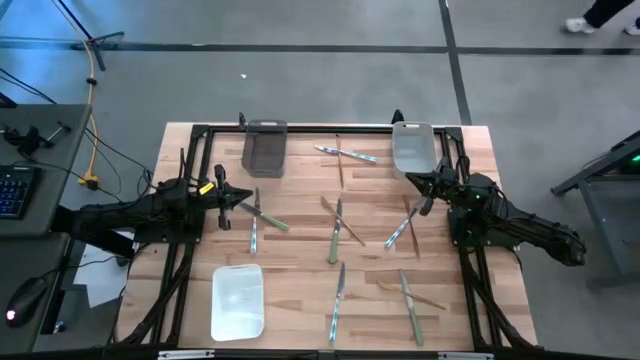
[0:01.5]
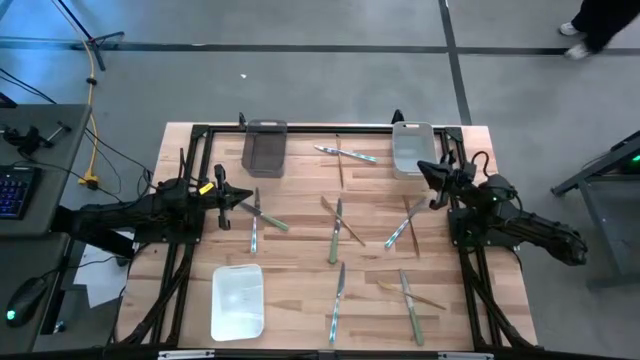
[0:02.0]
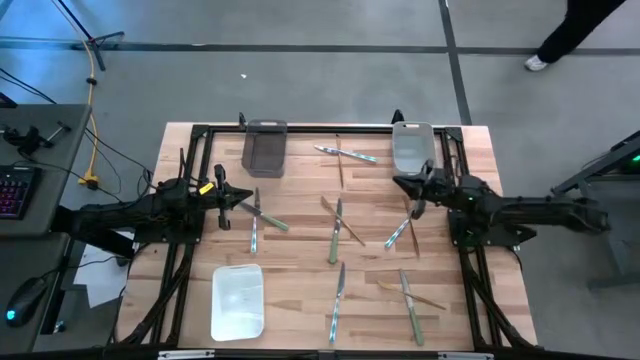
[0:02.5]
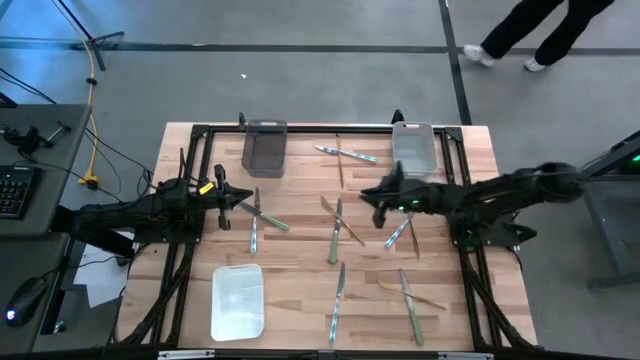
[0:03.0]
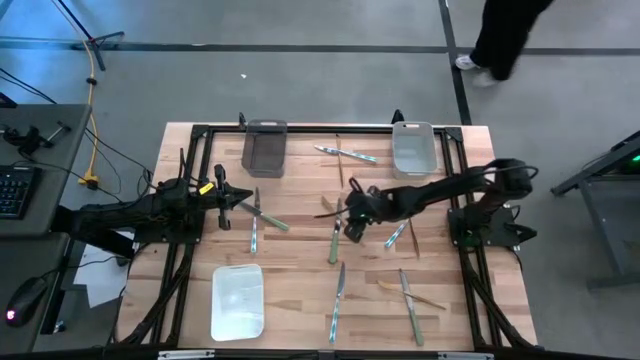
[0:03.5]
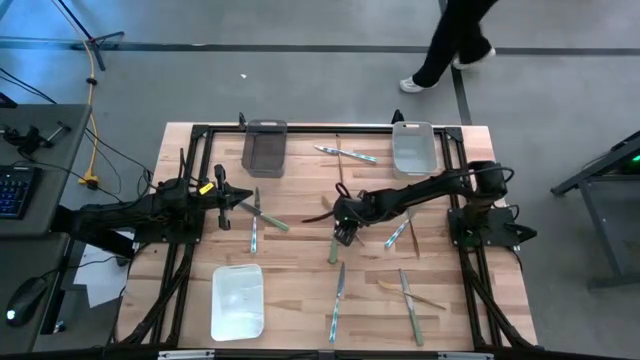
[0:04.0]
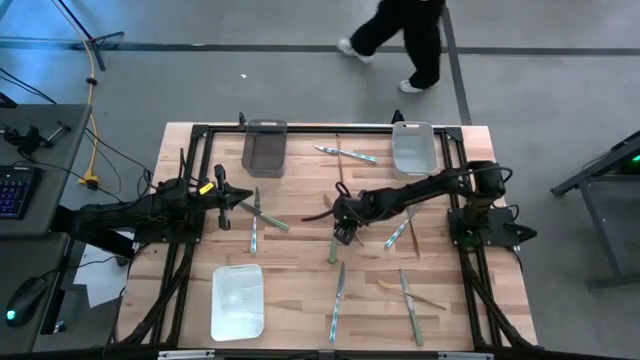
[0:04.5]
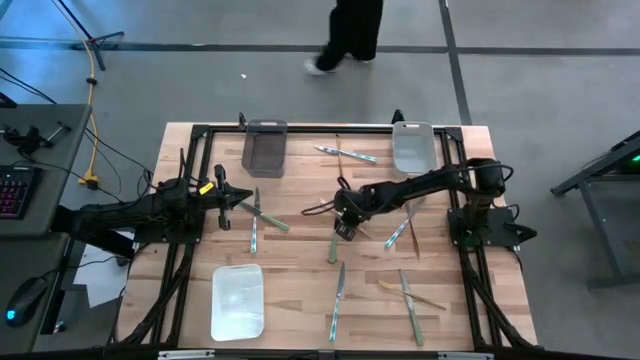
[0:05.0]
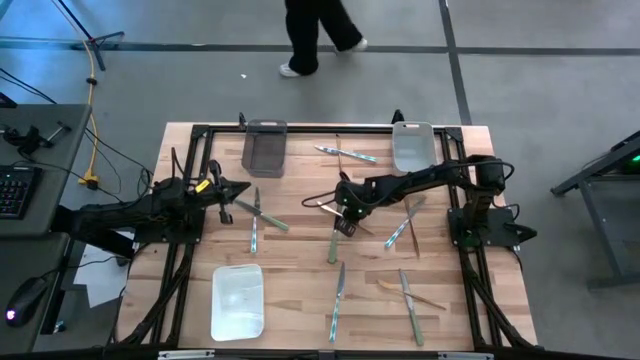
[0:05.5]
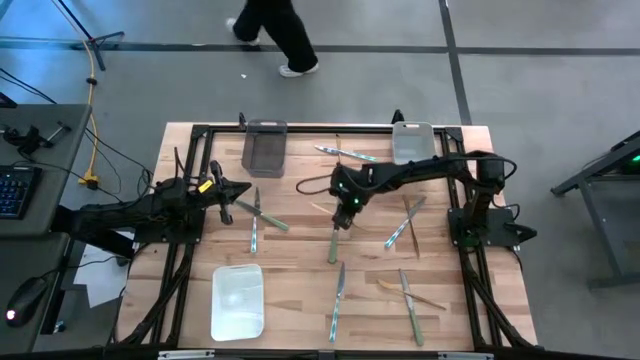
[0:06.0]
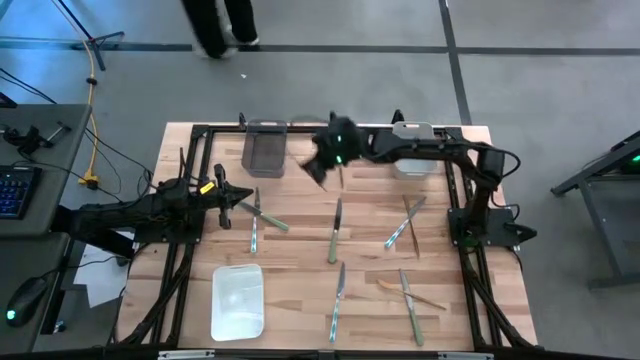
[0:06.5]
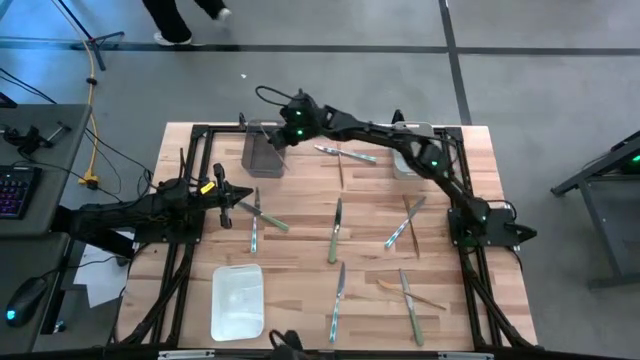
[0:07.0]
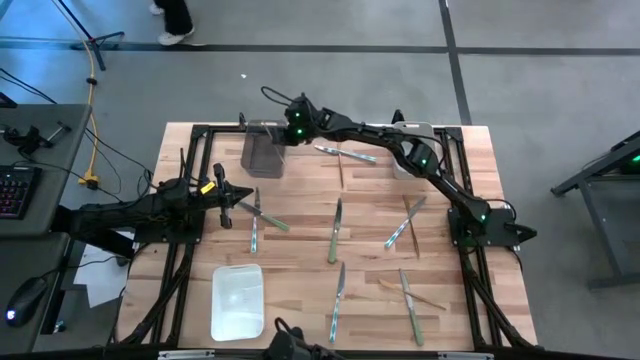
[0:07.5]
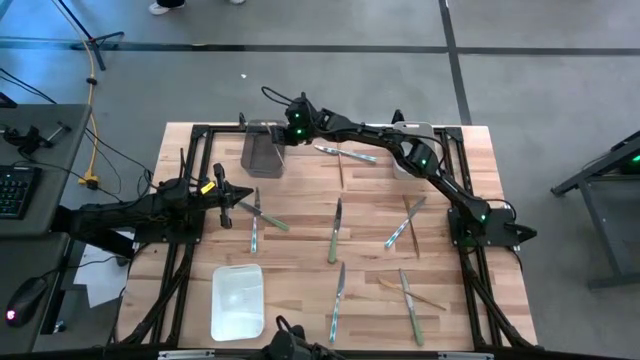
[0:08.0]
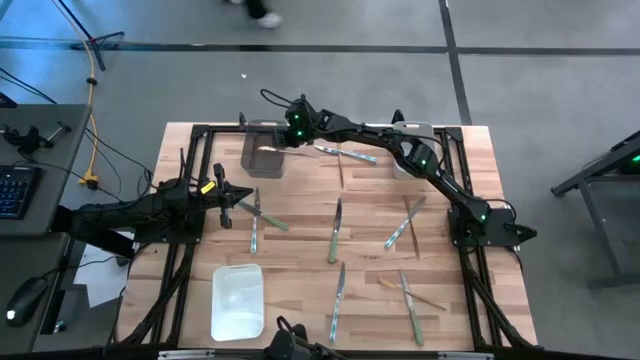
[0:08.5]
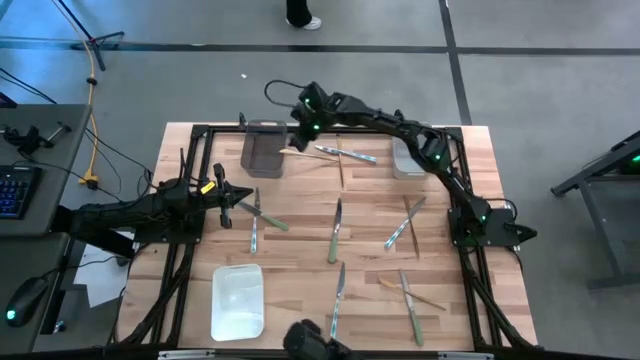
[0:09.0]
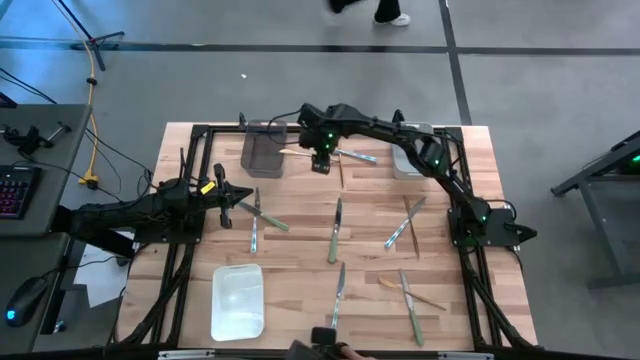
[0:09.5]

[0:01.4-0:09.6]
Task: Sort silverware by color (type)
Put the gold table knife into black bin

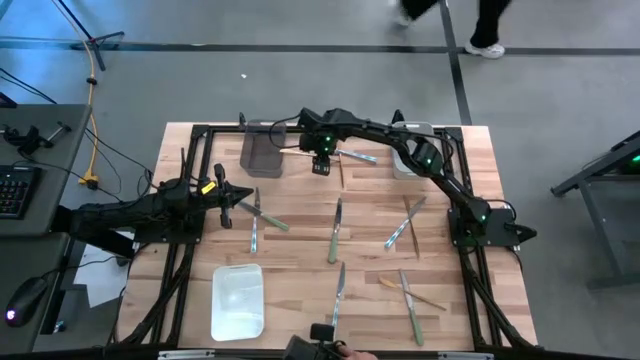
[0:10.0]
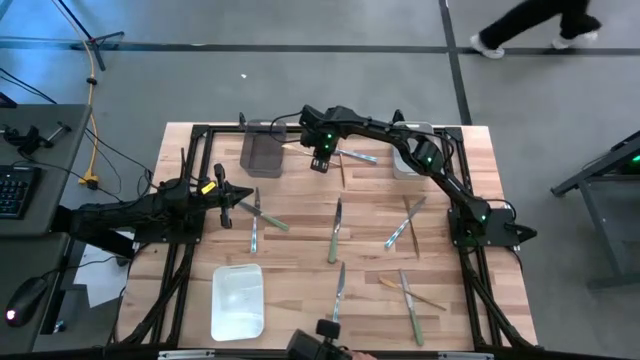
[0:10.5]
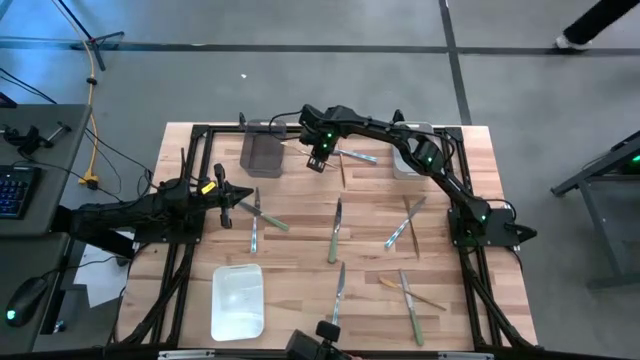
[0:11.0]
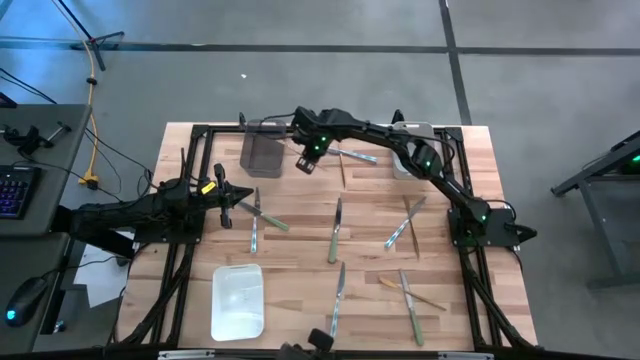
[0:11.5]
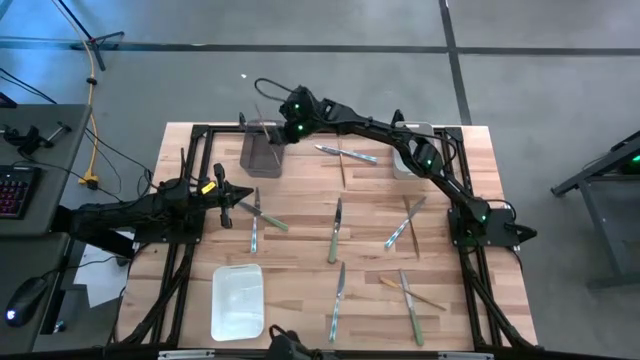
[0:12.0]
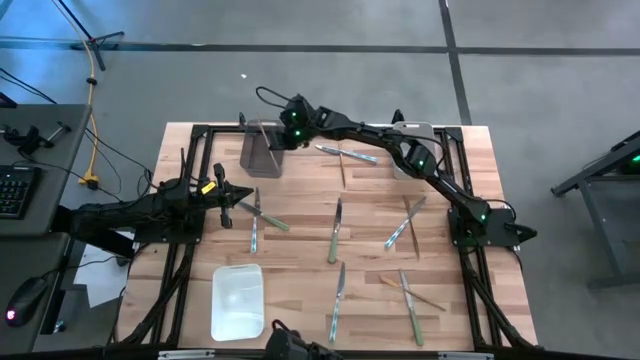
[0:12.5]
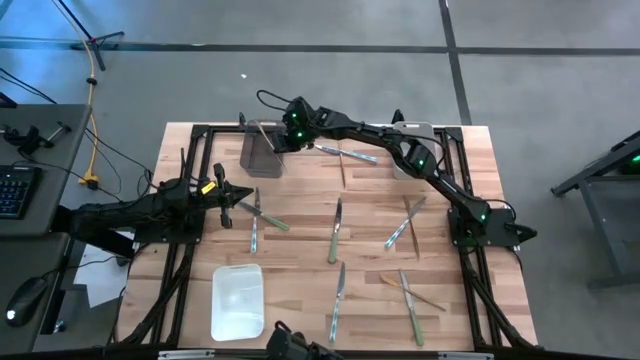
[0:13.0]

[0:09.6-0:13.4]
Put the middle left orange table knife into black bin

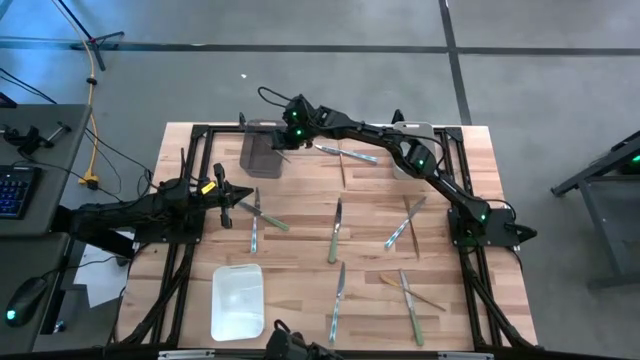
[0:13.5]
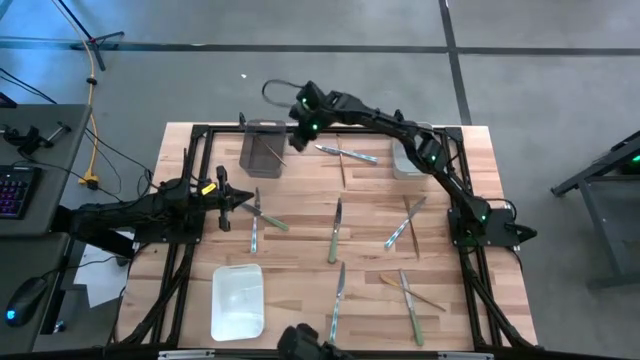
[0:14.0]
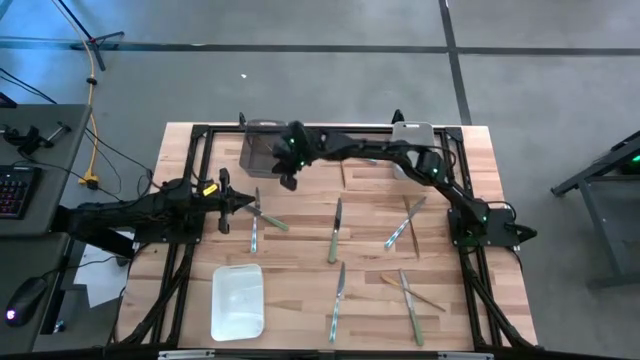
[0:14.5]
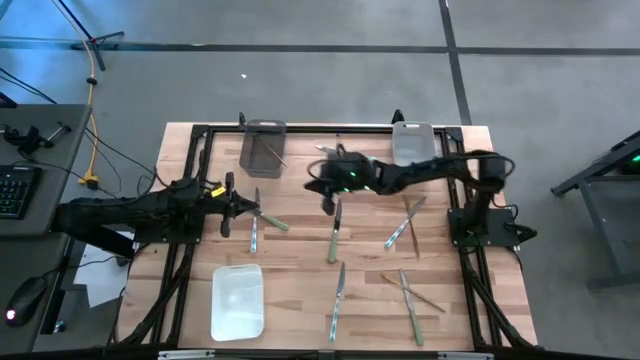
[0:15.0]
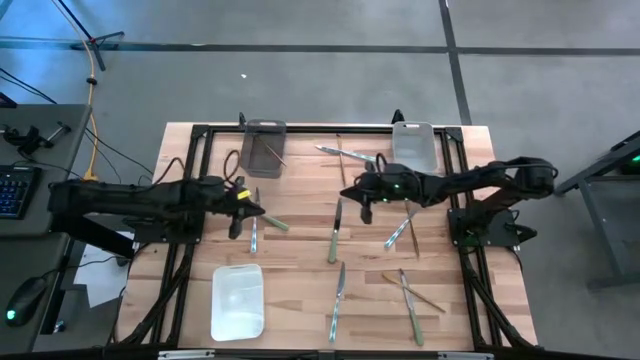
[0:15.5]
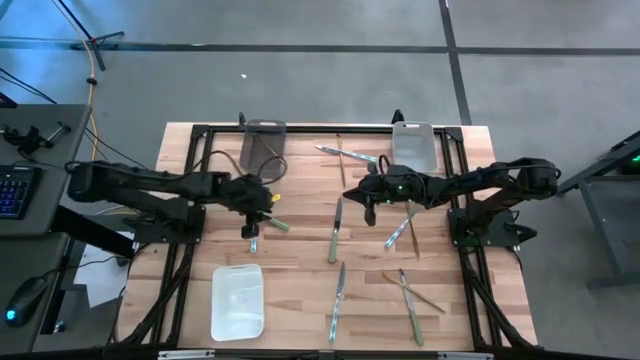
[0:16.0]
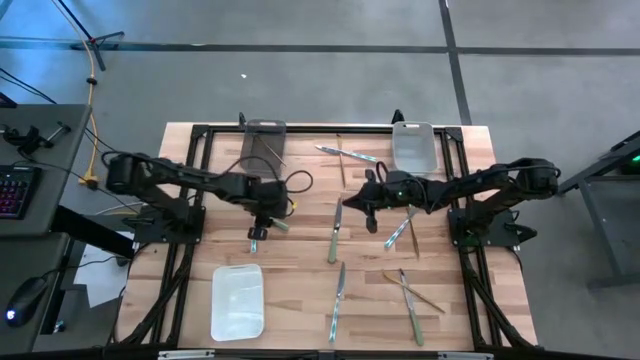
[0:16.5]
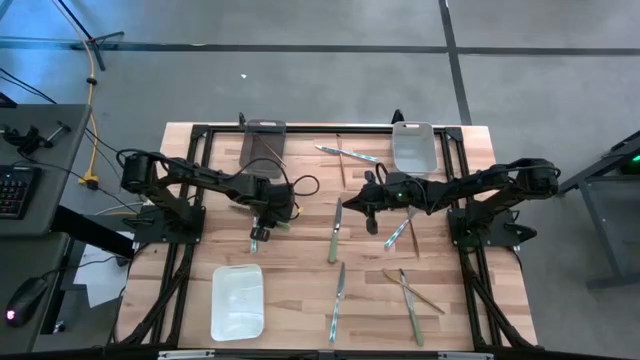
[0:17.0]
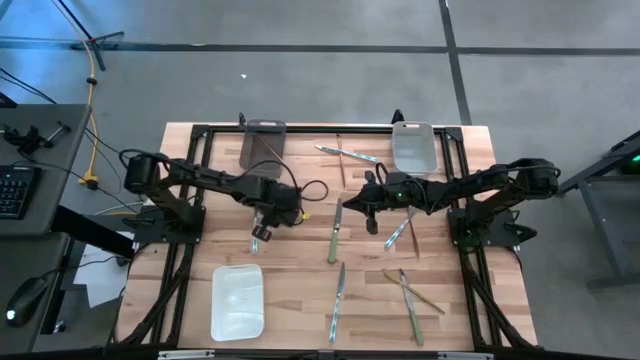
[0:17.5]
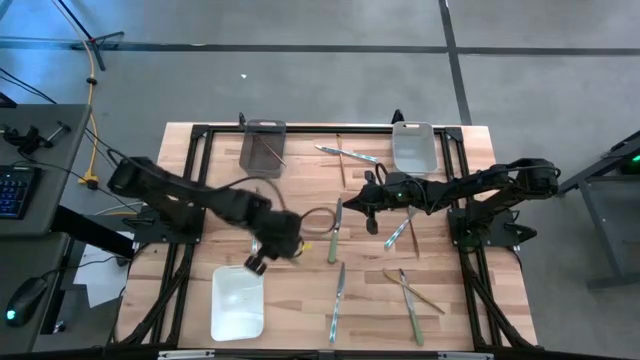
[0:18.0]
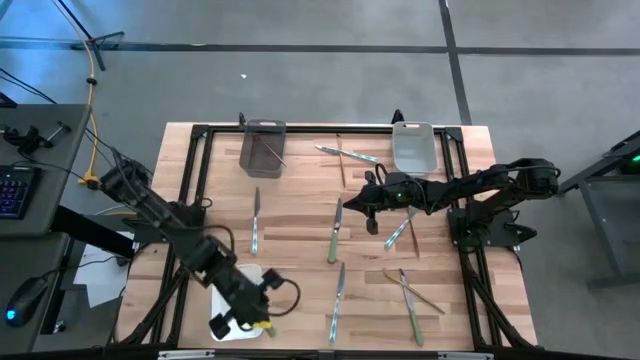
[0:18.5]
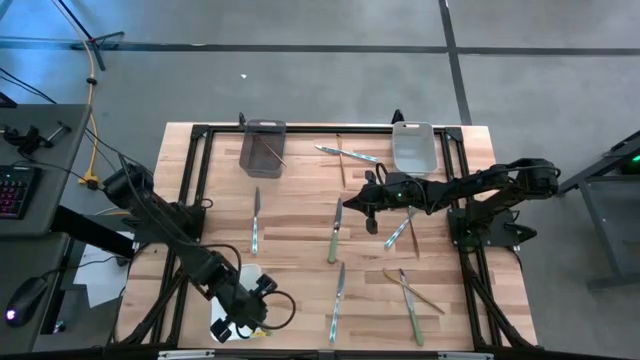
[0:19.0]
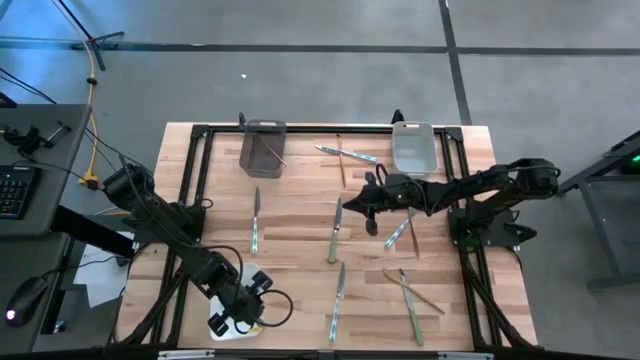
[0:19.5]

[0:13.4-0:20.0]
Put the top left green table knife into the white bin

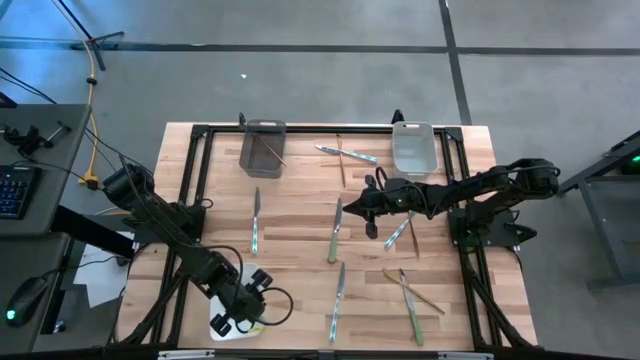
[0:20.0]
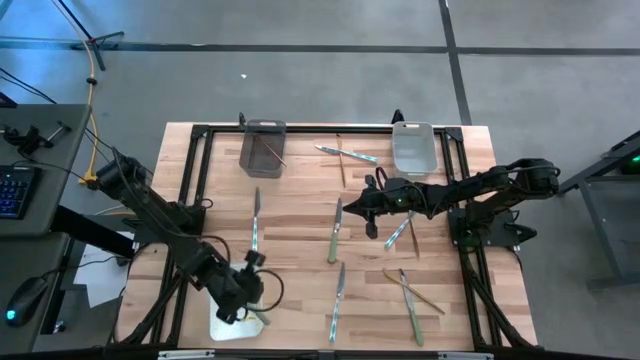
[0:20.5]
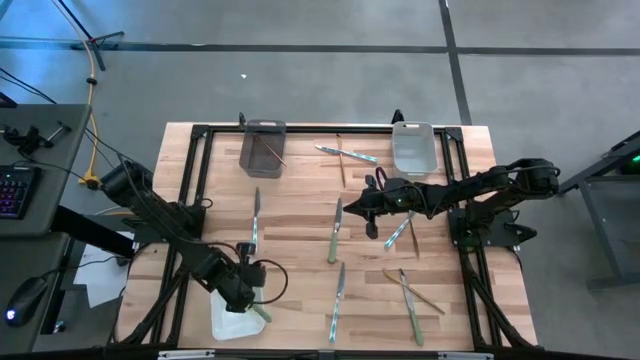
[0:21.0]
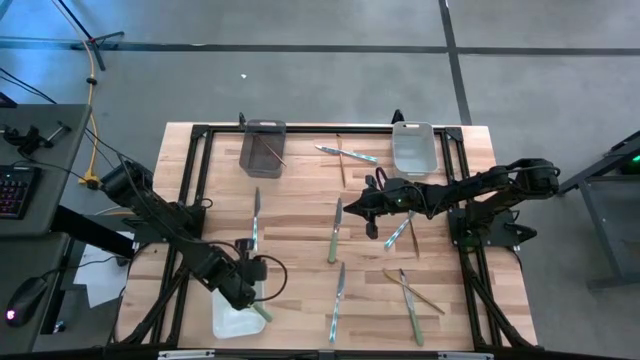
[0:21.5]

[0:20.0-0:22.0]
Adjust the white bin

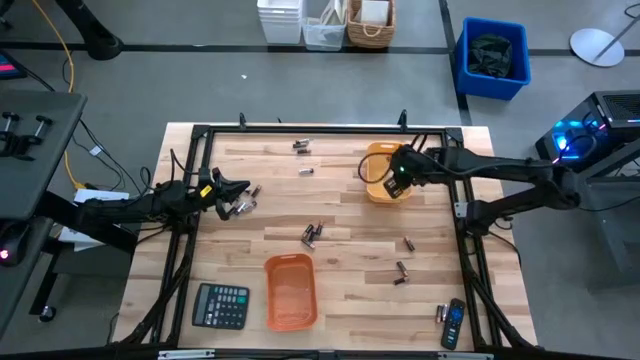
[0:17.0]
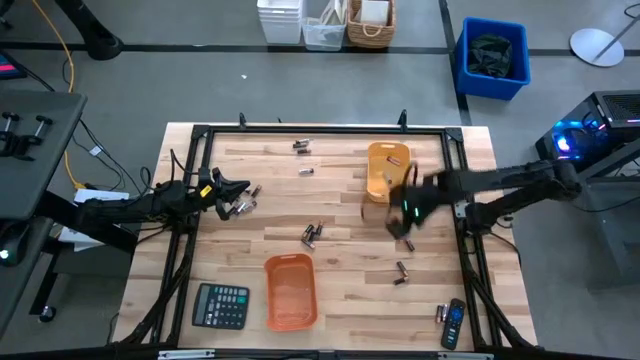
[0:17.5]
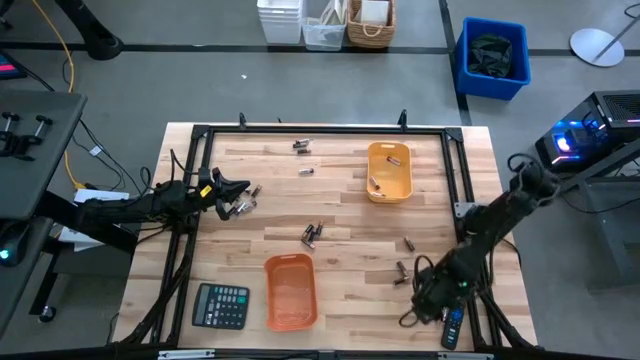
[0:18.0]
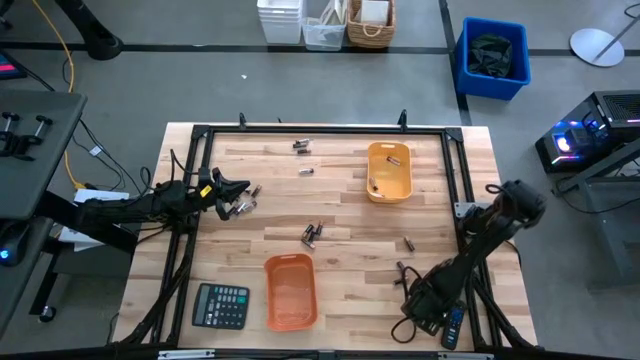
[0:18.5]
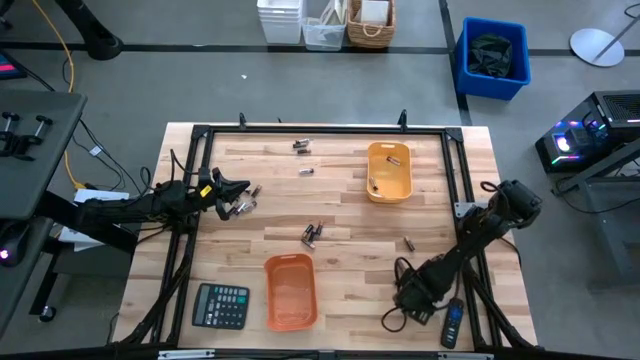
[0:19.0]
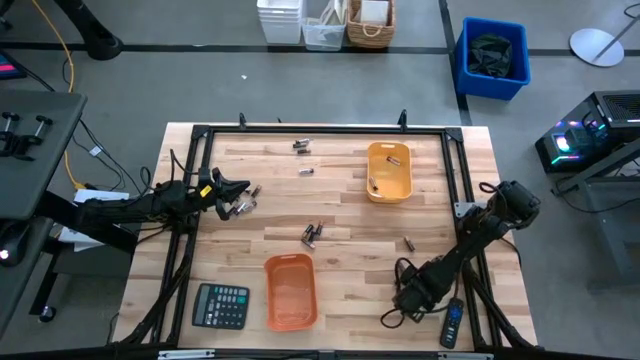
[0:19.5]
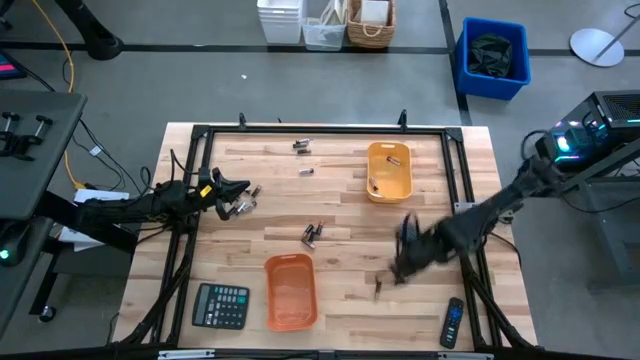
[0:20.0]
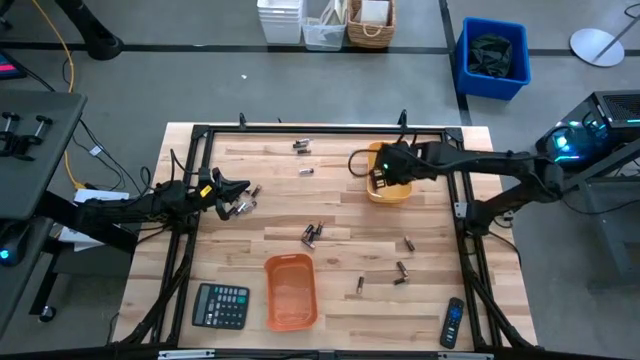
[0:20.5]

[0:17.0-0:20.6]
Task: Sort batteries
Put the silver battery into the yellow bin
